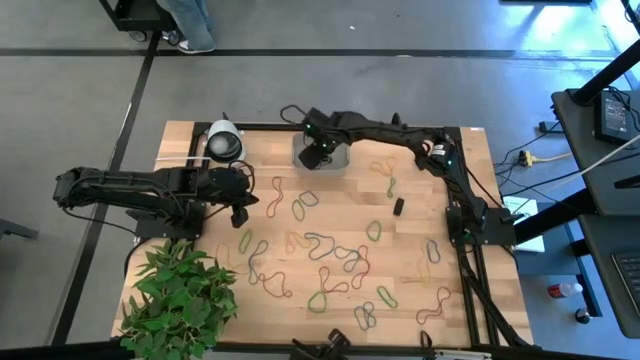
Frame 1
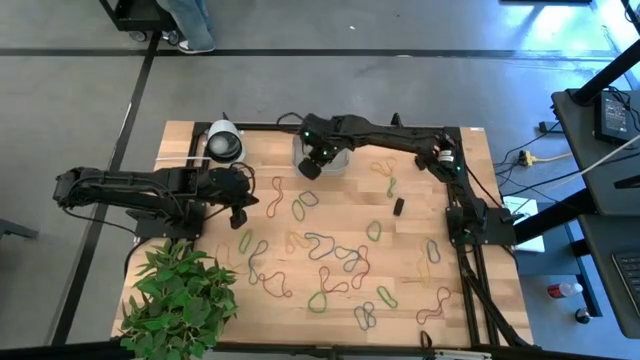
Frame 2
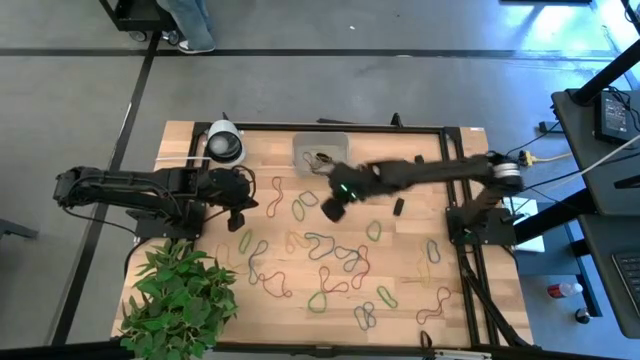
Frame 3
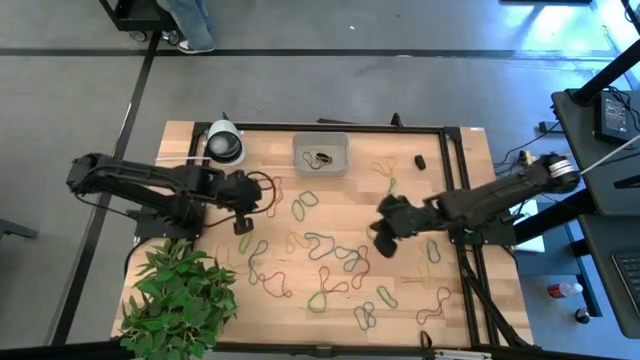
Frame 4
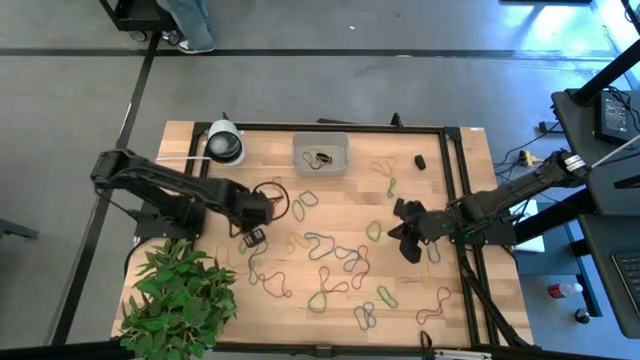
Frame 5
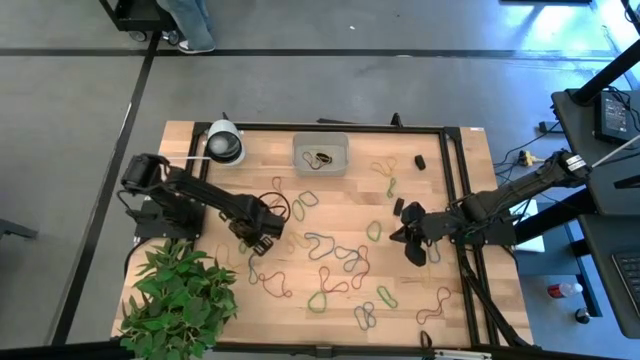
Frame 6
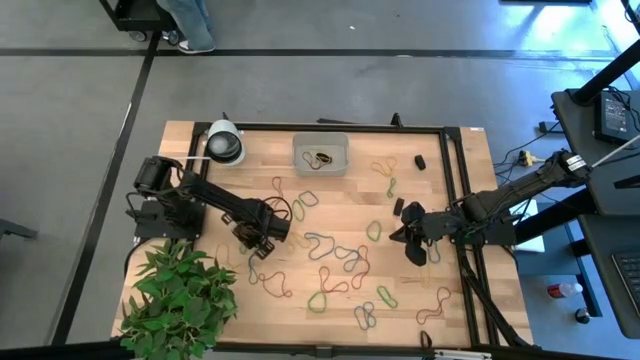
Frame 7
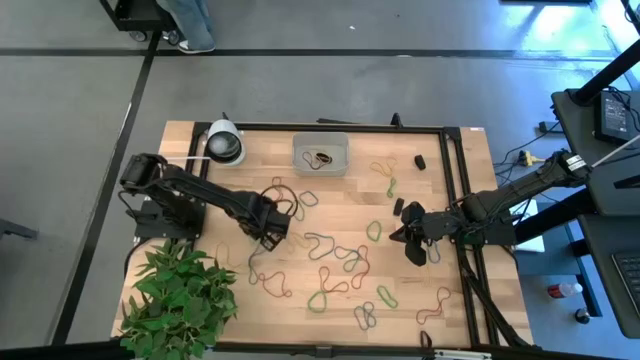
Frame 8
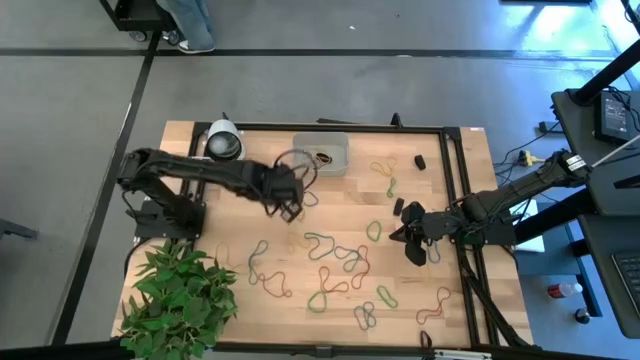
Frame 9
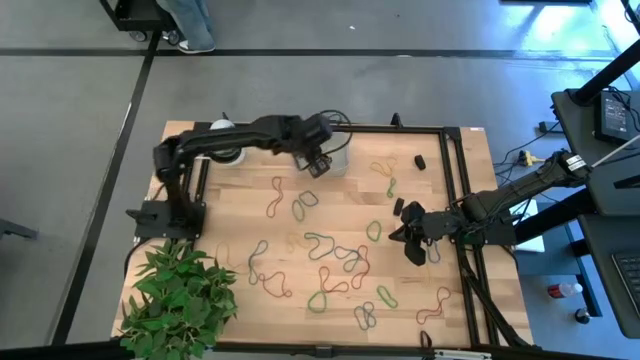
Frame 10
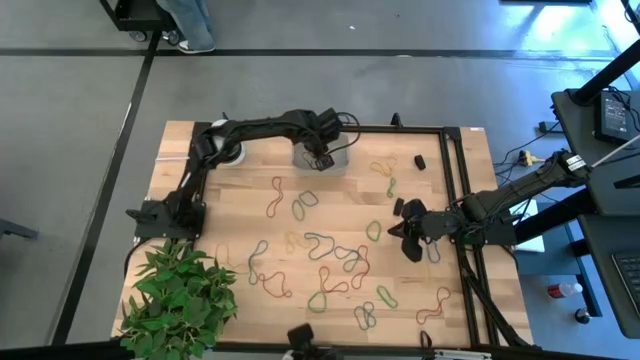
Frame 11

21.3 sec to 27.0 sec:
Task: Pick and place rubber bands into bin
Put the green rubber band into the white bin

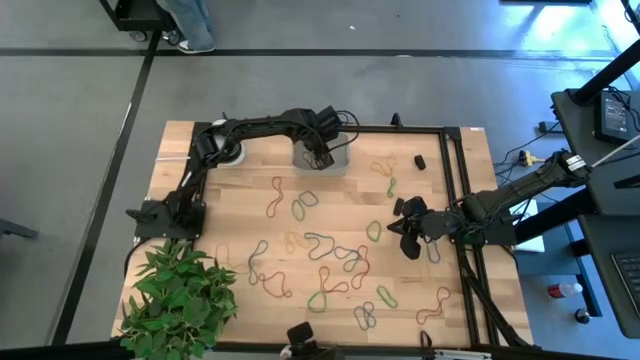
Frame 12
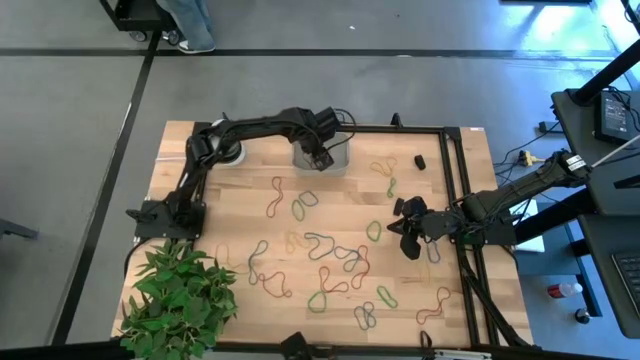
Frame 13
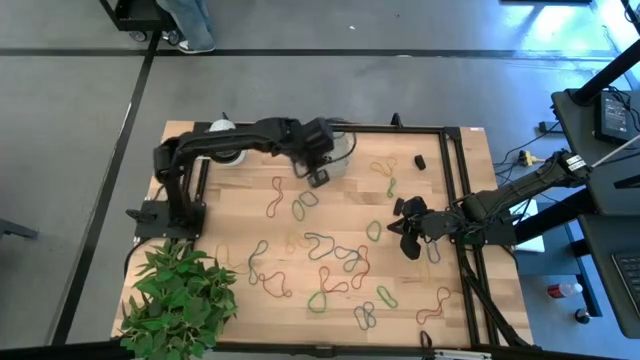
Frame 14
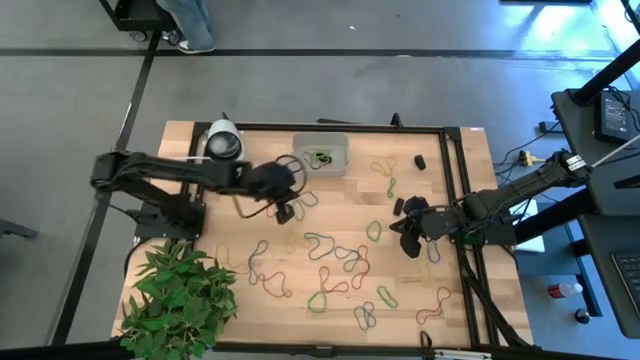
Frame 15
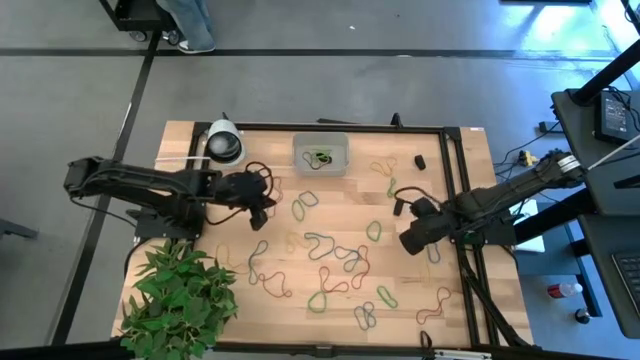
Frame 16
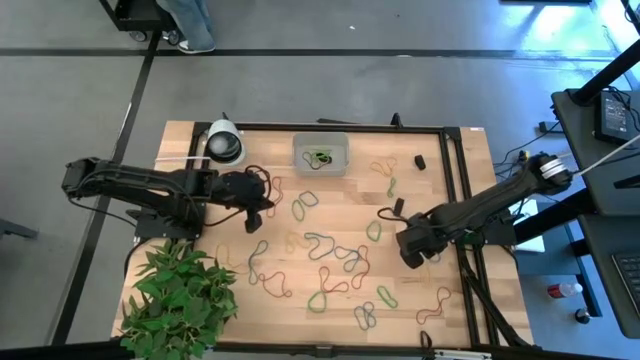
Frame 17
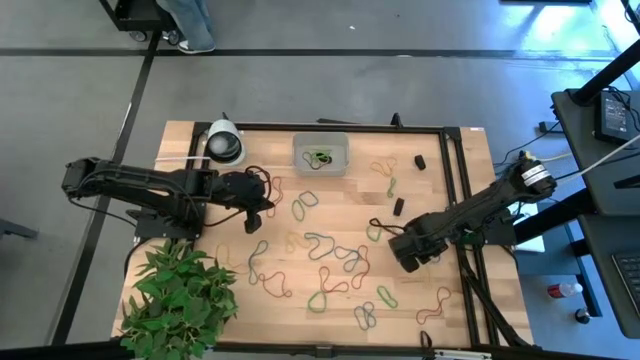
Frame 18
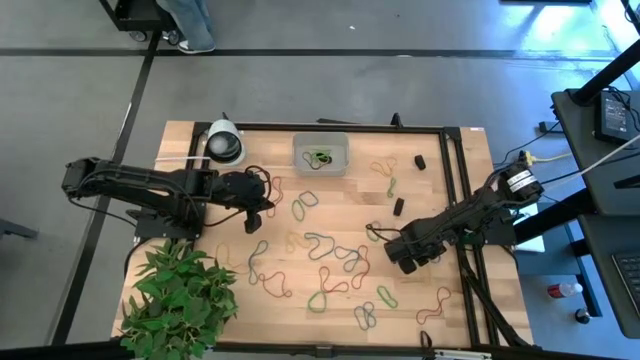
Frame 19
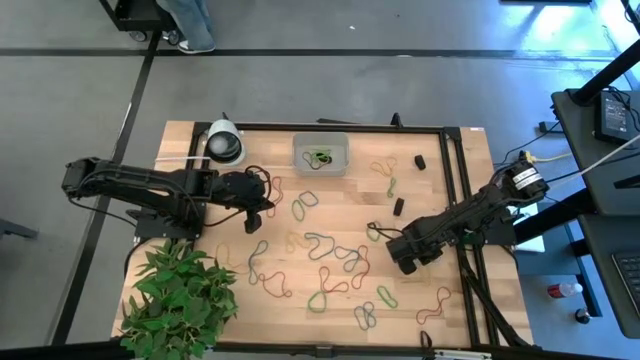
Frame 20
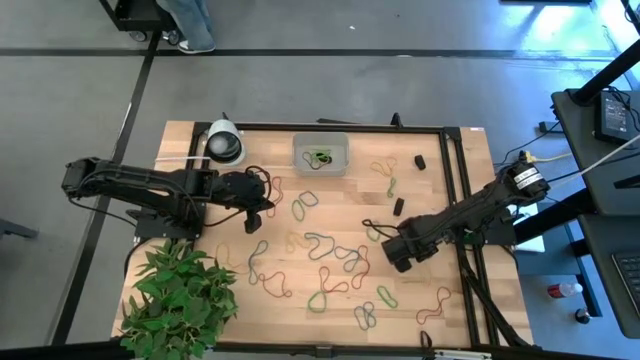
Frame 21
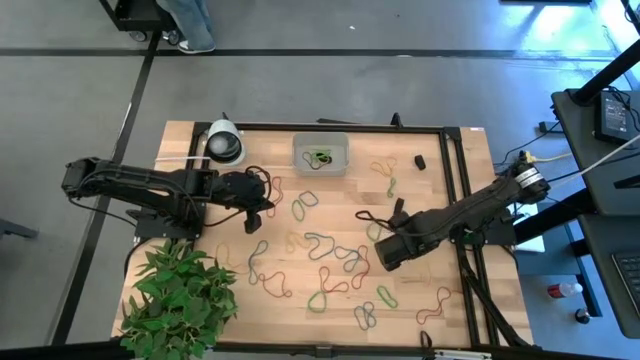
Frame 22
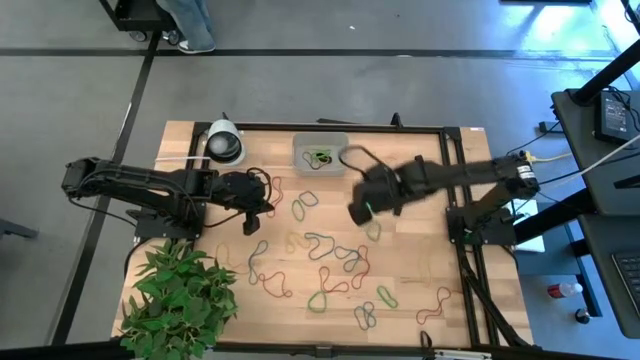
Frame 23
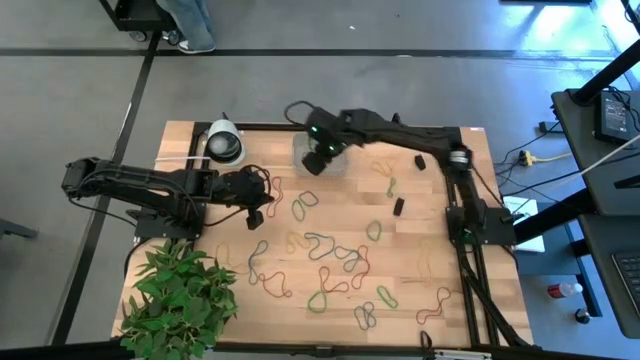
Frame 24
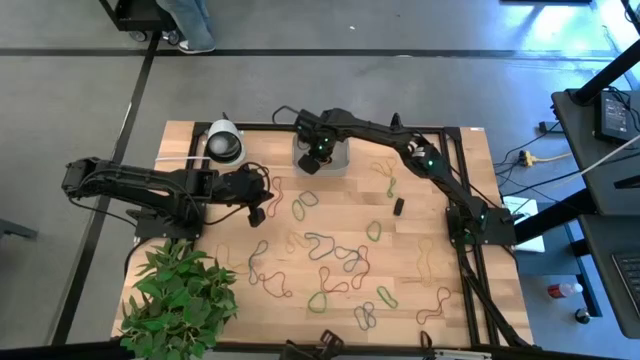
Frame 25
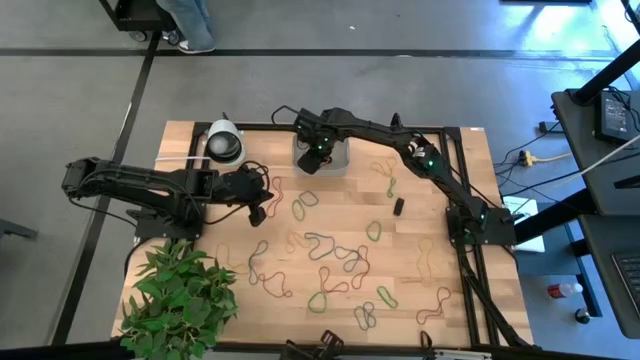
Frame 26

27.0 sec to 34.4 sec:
Put the blue rubber band into the white bin

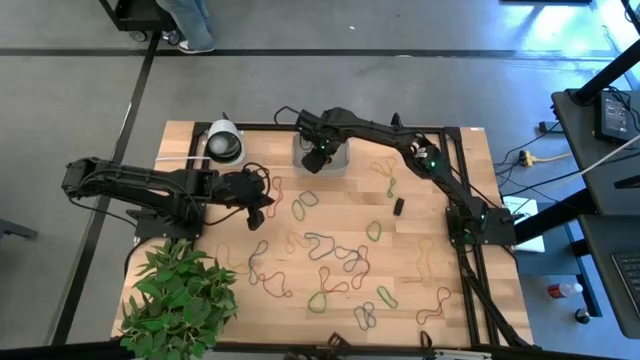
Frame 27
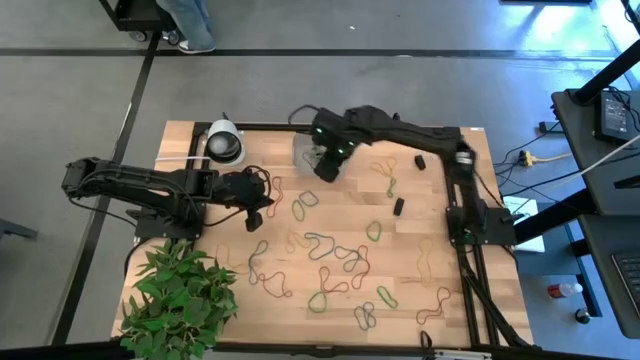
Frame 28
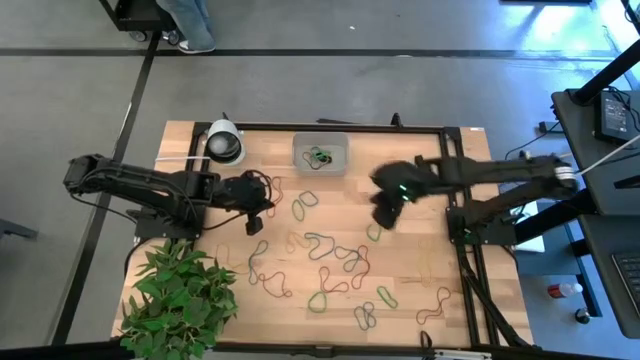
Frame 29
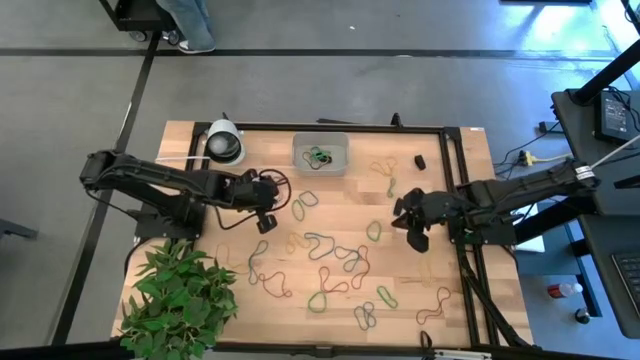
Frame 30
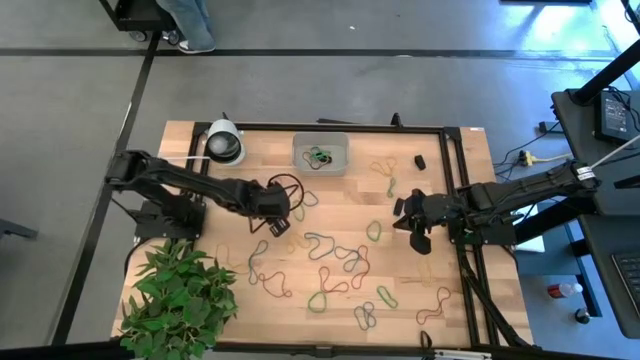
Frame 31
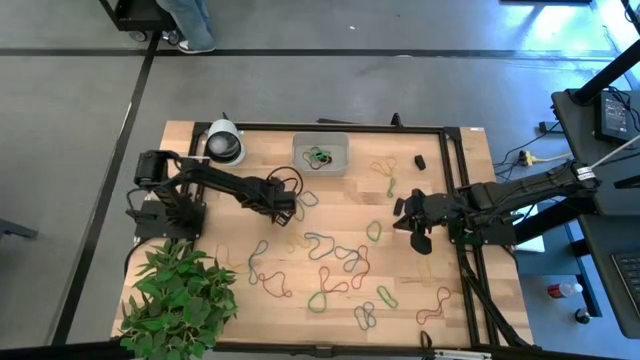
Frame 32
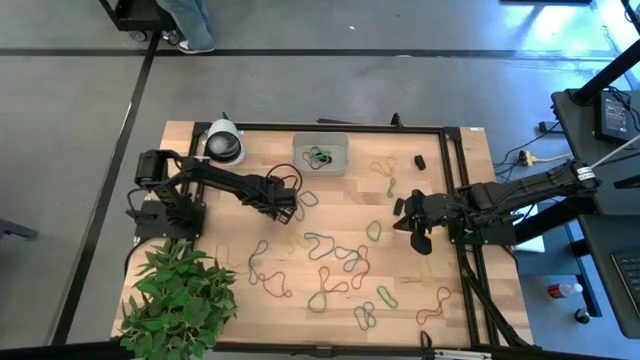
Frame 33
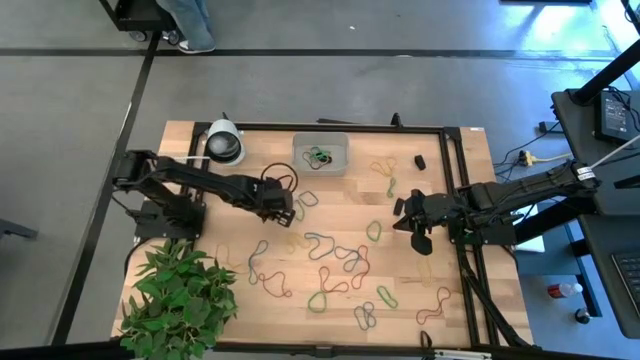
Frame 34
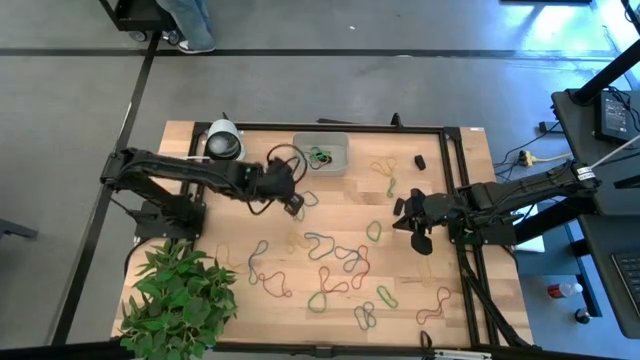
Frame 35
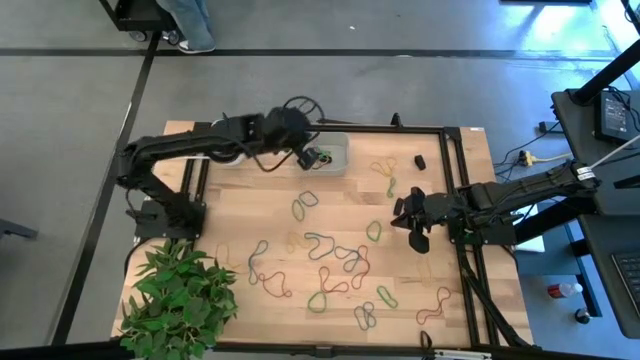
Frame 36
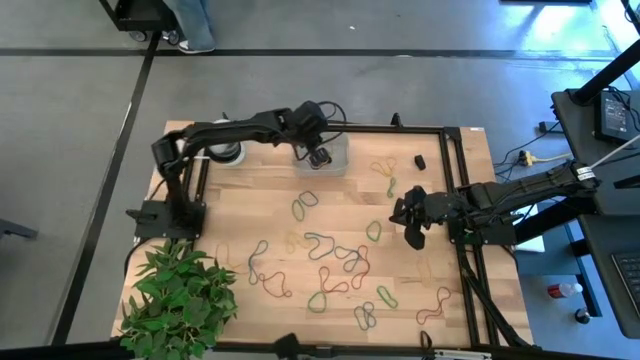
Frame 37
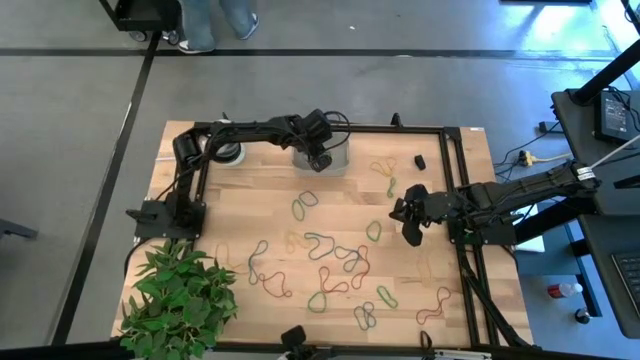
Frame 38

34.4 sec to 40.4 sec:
Put the red rubber band into the white bin

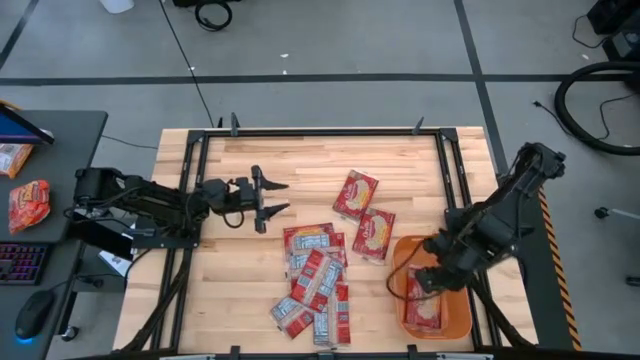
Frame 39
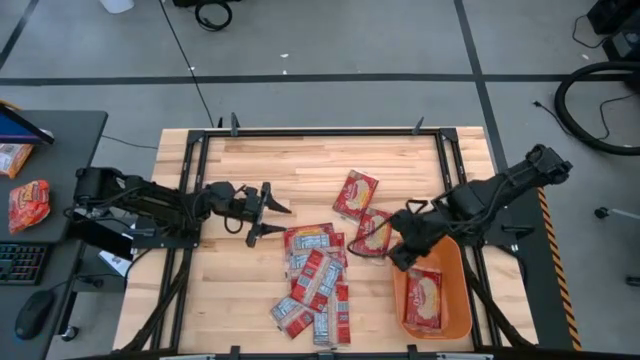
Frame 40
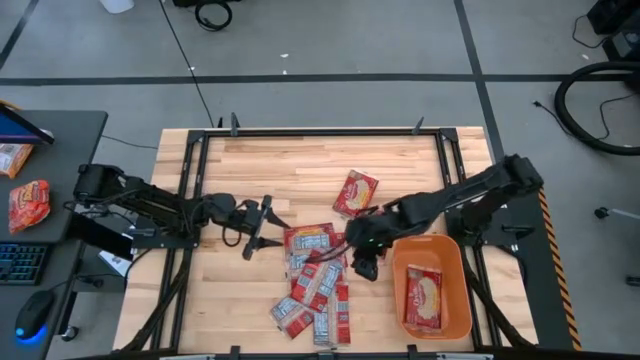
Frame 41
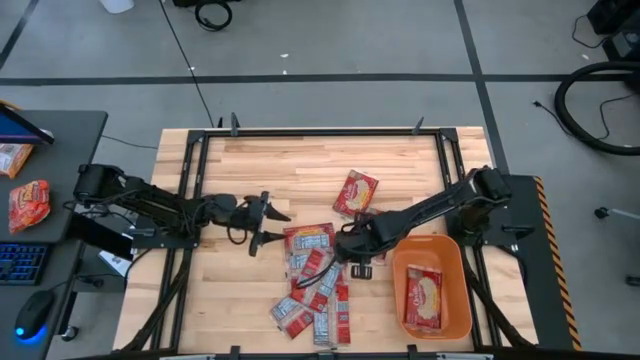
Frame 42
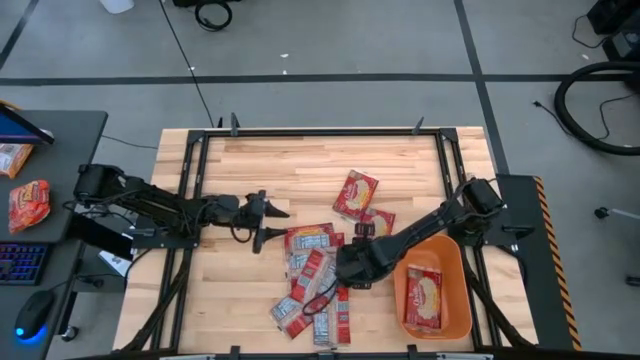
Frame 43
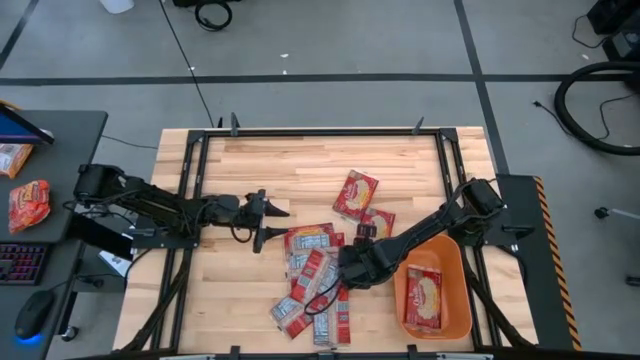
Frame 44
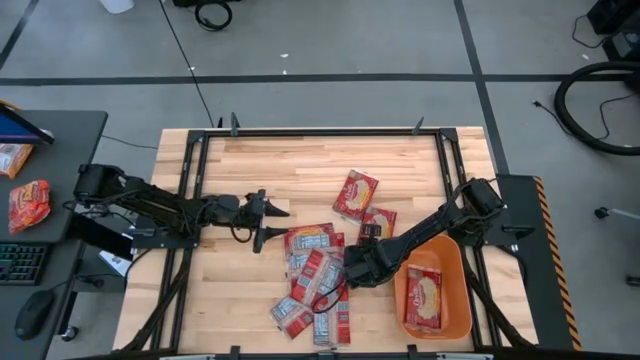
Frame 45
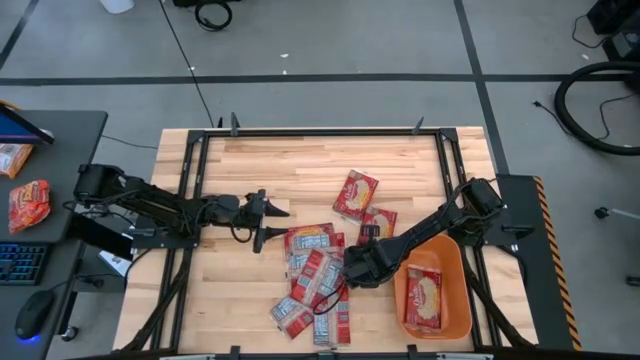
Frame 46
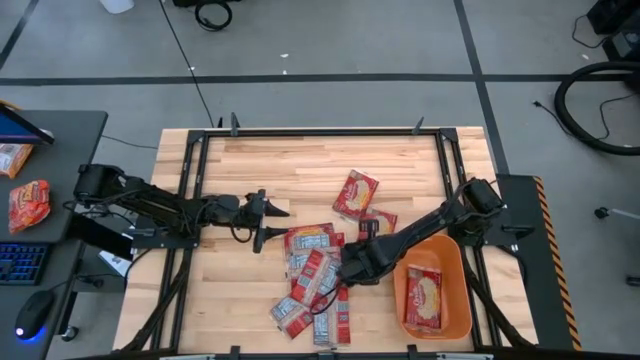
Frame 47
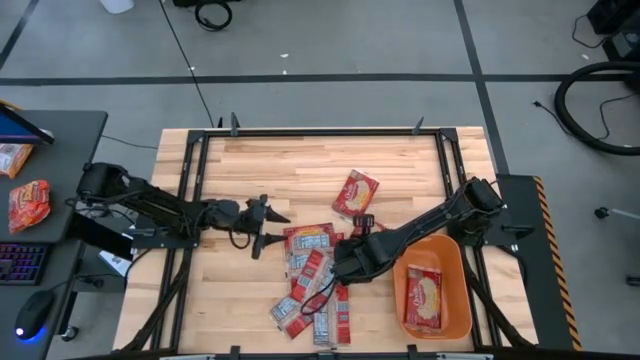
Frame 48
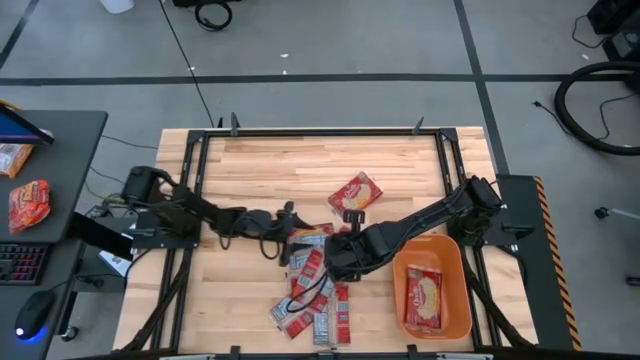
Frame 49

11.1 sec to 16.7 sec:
Task: Sort popcorn bags into baskets
Put the red popcorn bag into the orange bin
